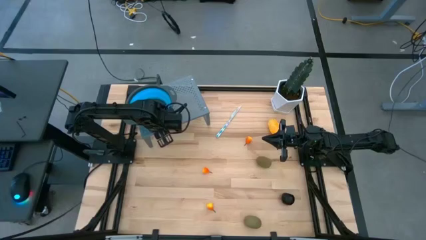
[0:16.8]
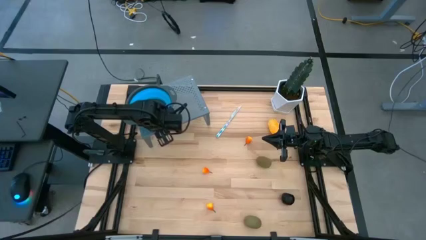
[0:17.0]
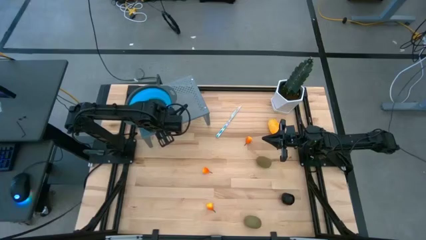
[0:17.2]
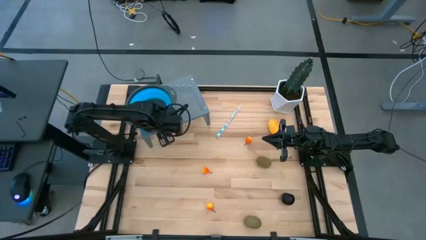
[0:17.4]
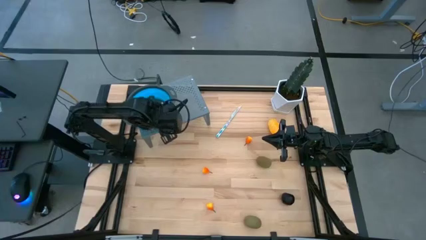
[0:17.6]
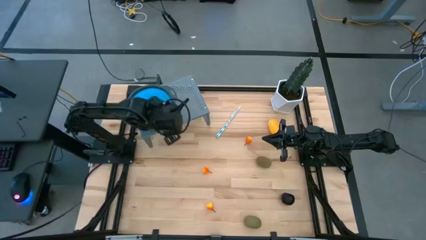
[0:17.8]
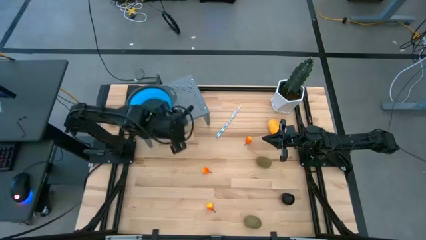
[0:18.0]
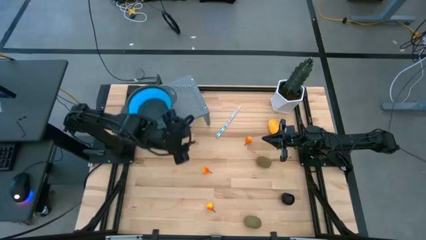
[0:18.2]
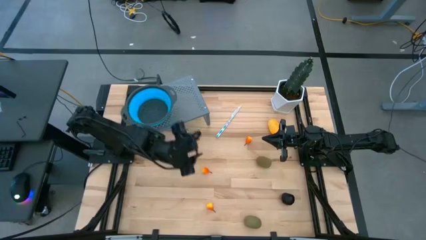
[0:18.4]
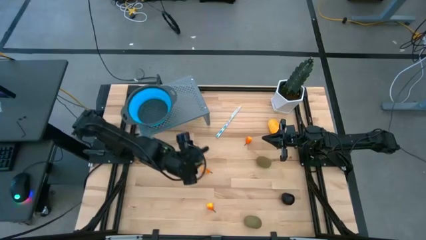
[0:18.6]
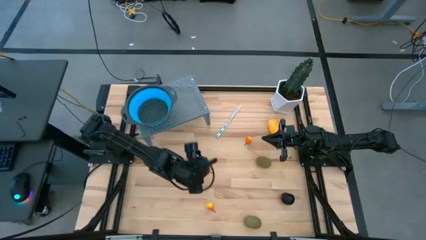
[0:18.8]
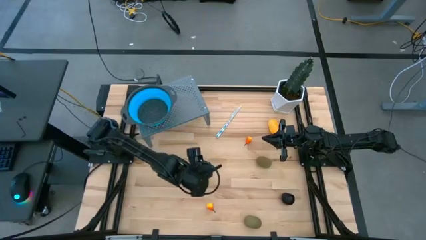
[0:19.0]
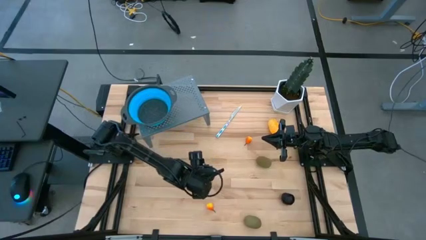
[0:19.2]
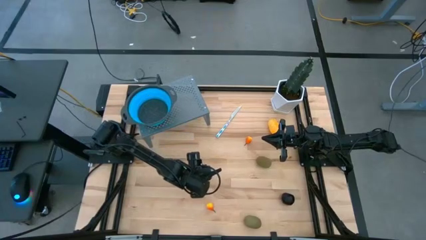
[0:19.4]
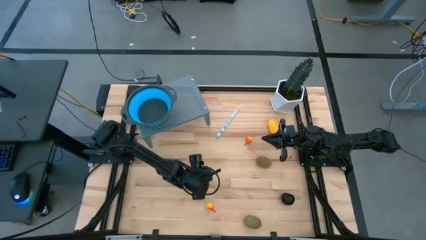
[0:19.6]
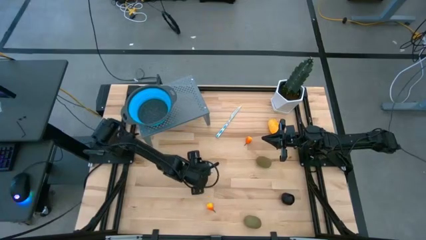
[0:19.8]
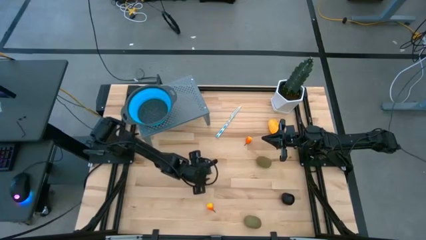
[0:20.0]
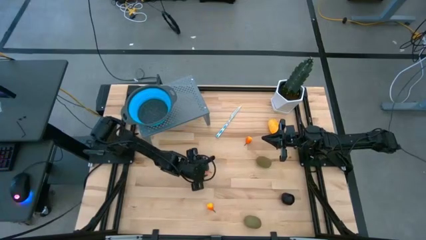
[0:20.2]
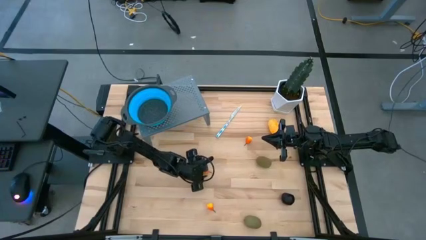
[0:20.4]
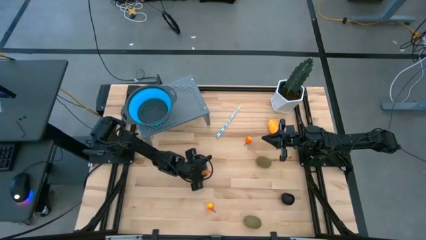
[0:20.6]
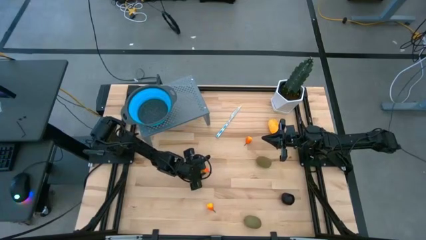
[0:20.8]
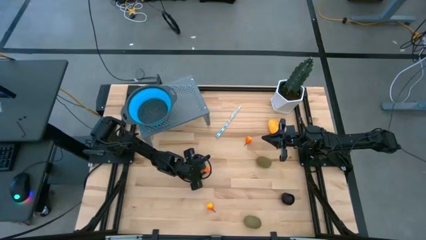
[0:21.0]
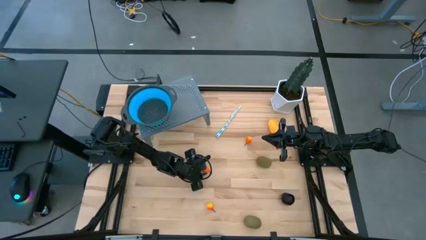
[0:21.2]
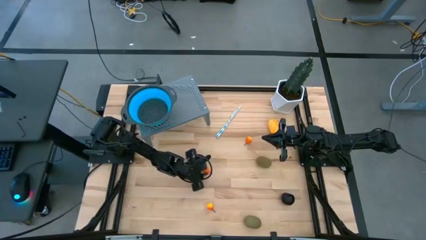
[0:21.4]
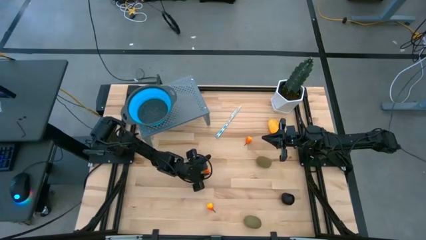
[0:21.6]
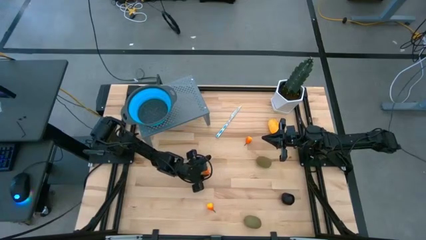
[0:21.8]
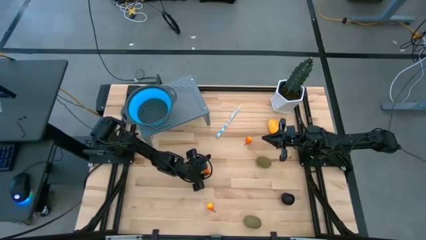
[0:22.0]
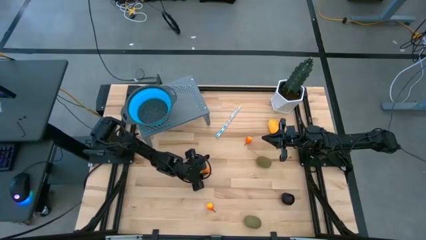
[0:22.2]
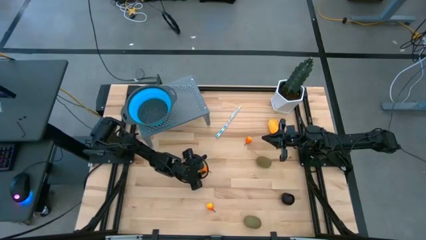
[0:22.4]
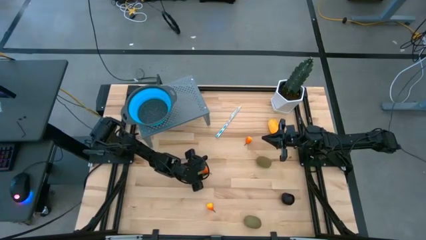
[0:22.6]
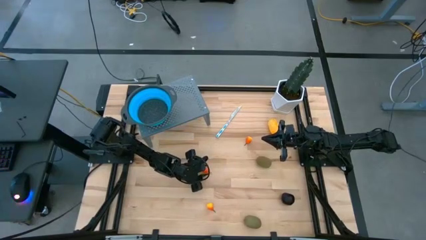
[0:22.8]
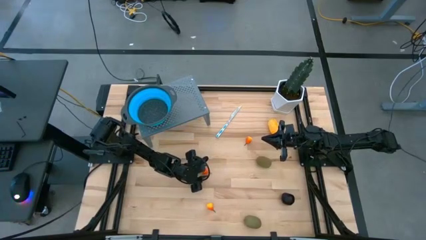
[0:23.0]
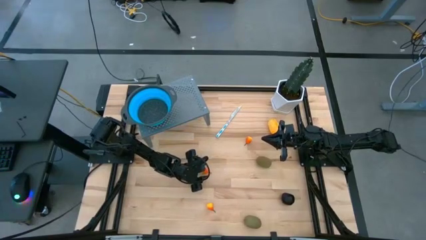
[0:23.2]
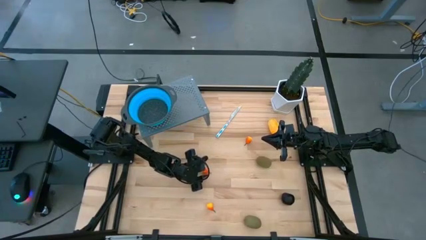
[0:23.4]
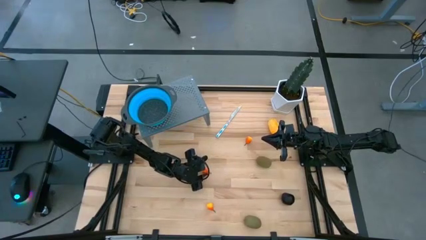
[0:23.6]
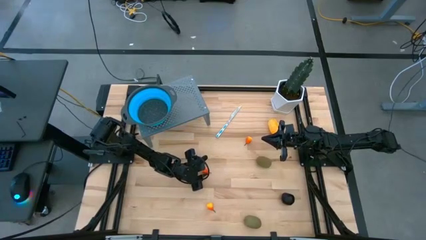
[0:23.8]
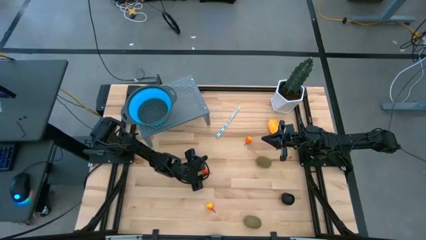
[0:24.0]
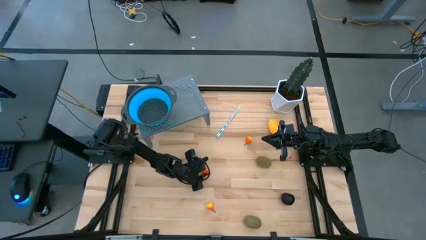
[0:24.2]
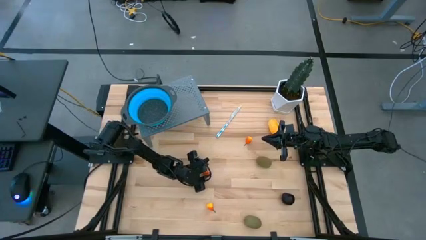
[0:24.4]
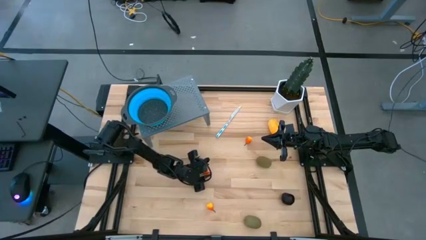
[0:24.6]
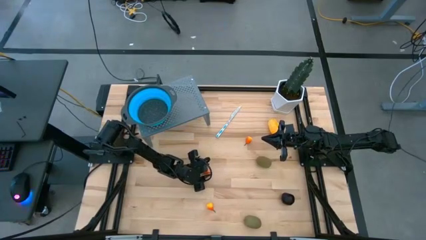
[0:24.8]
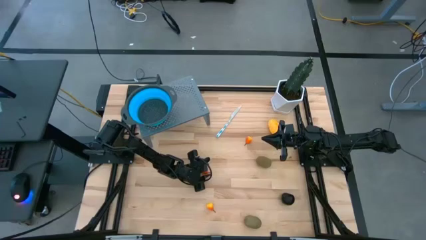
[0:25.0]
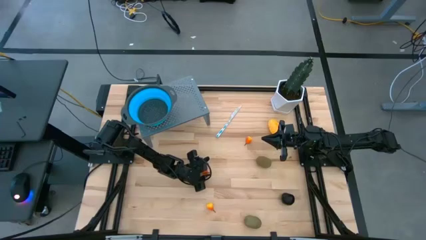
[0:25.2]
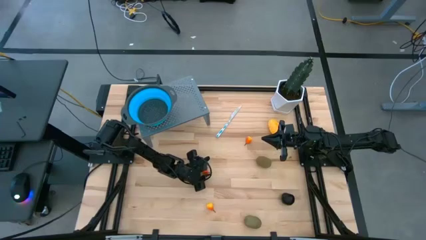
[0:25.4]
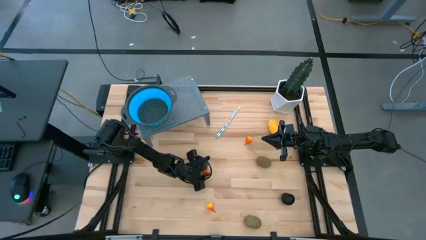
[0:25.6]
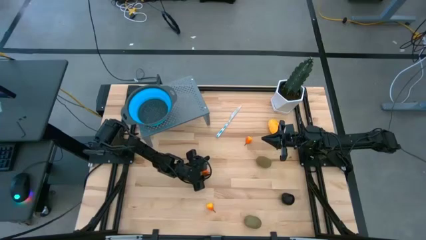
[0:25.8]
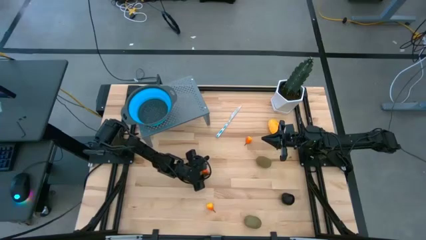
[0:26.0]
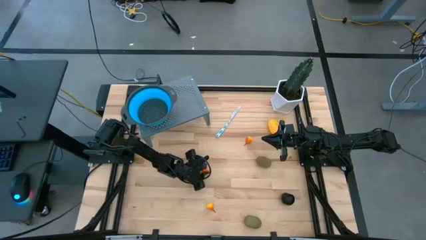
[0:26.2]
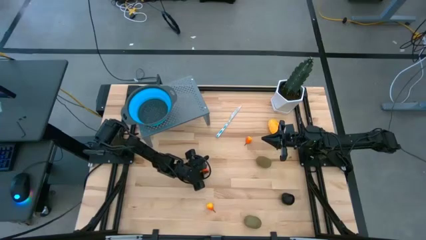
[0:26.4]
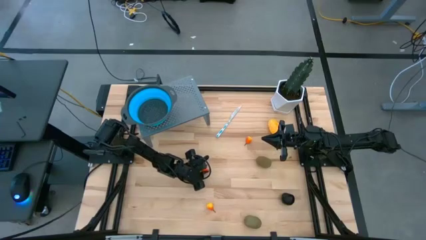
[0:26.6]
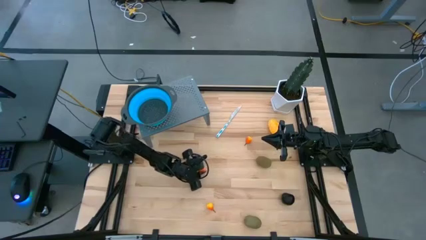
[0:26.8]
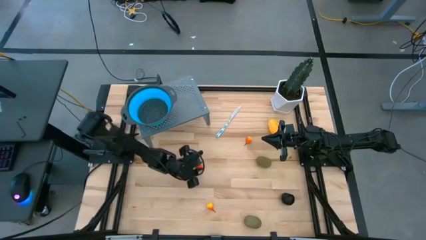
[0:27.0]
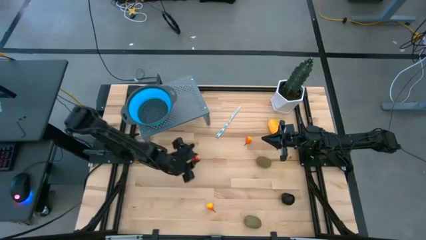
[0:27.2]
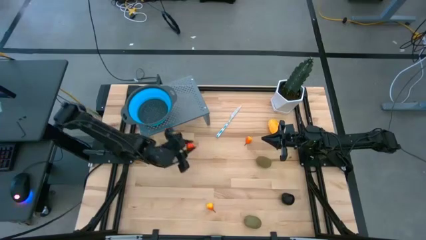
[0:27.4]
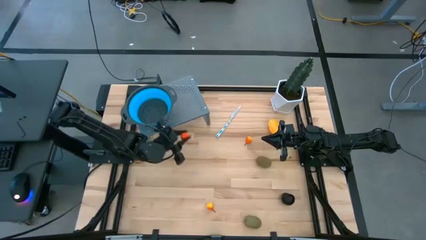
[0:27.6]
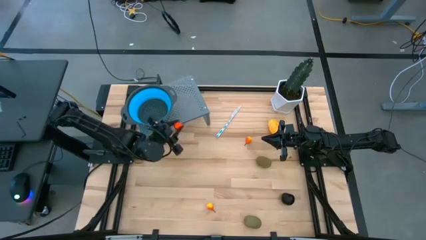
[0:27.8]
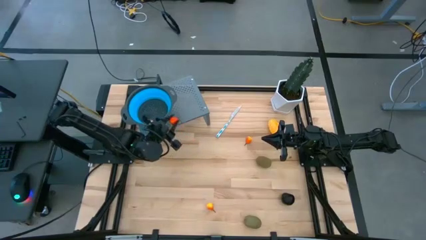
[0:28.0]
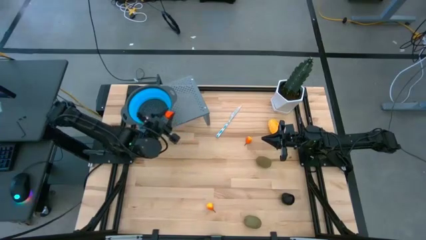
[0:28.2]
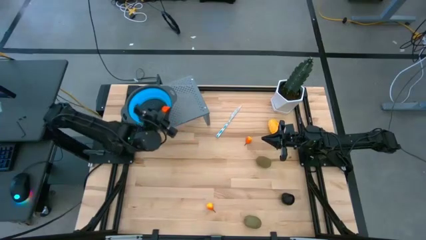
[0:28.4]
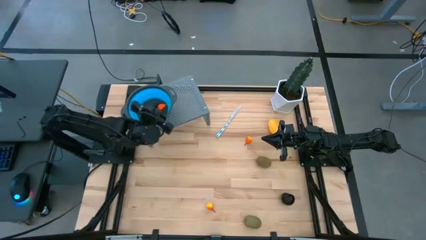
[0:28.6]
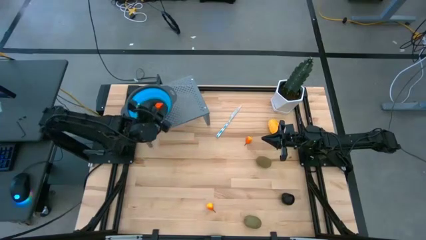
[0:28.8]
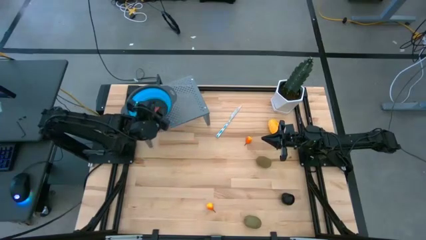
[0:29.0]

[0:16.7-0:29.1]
Task: Pick & Place Fruit
Put the middle orange pear into the blue strainer bowl

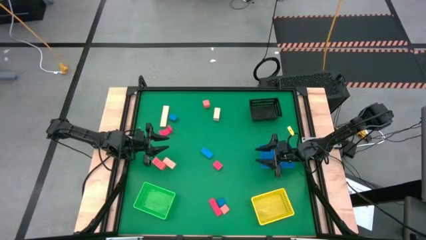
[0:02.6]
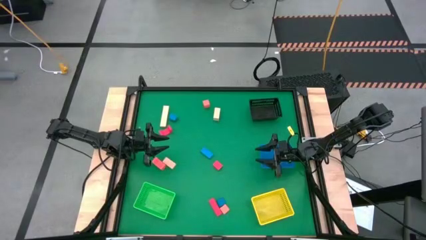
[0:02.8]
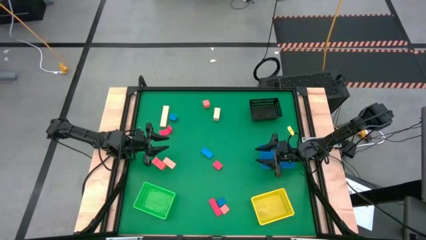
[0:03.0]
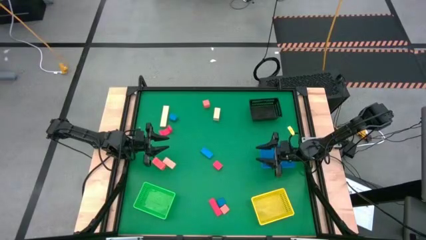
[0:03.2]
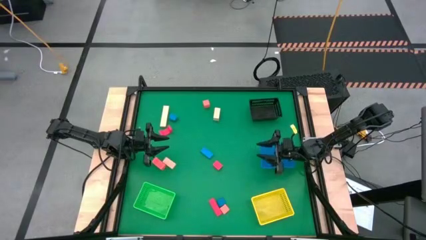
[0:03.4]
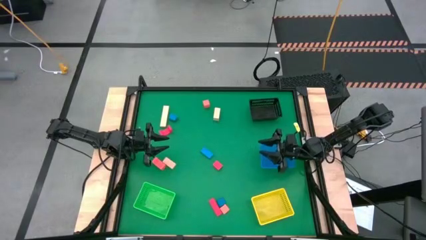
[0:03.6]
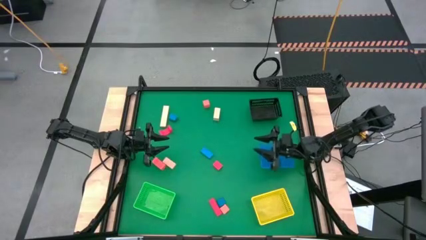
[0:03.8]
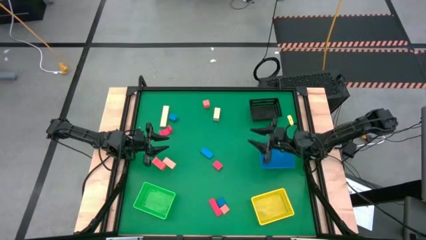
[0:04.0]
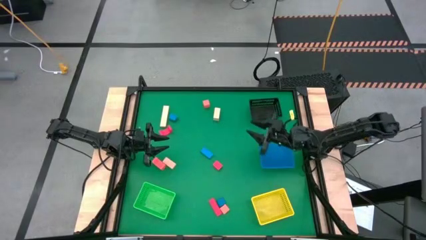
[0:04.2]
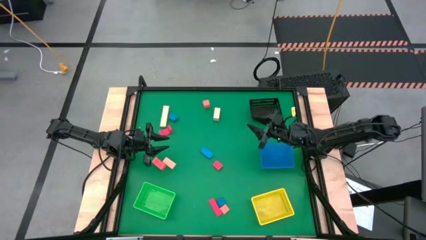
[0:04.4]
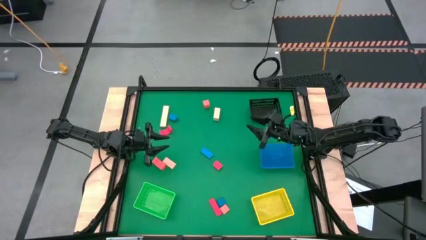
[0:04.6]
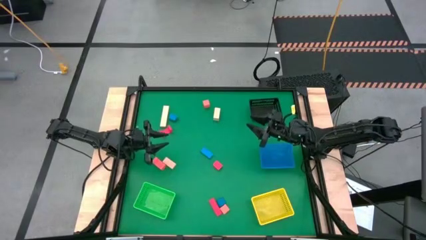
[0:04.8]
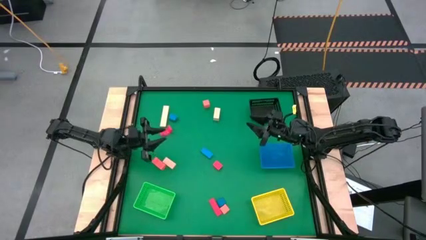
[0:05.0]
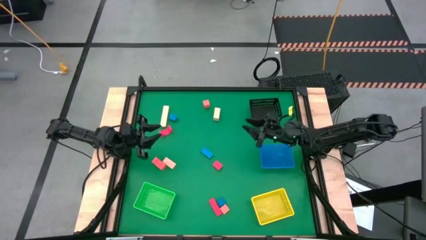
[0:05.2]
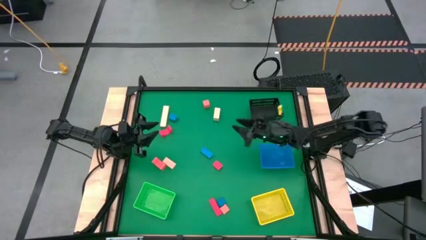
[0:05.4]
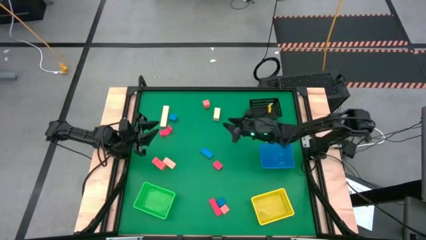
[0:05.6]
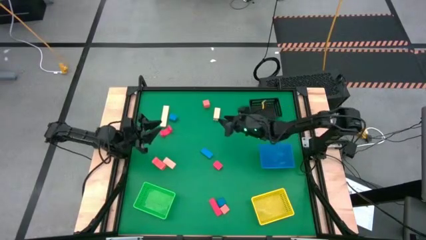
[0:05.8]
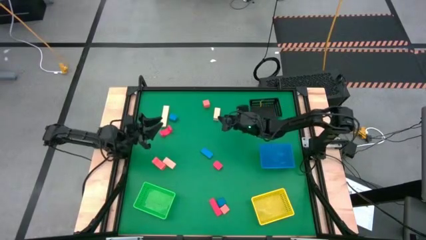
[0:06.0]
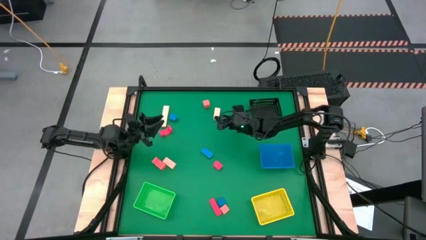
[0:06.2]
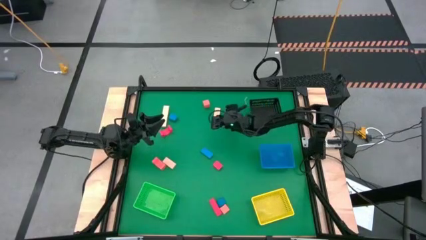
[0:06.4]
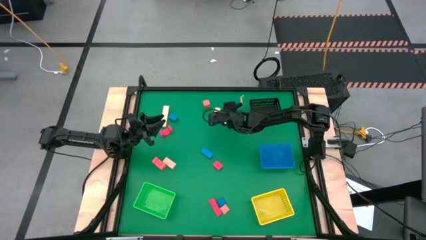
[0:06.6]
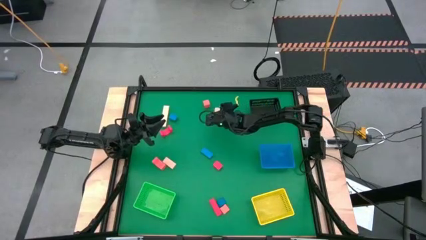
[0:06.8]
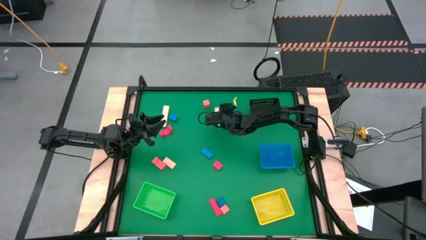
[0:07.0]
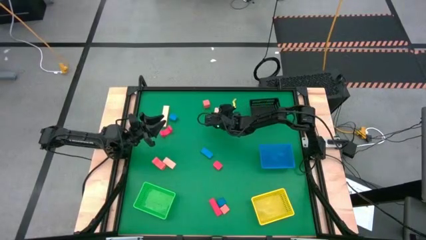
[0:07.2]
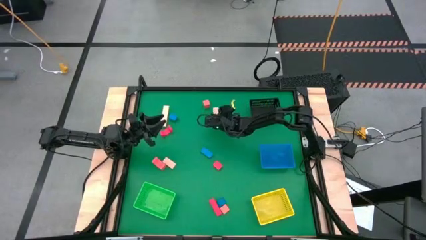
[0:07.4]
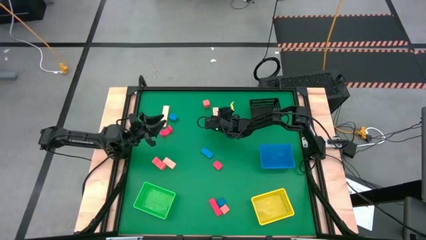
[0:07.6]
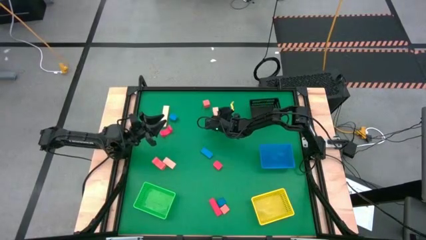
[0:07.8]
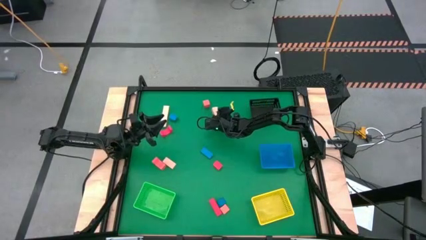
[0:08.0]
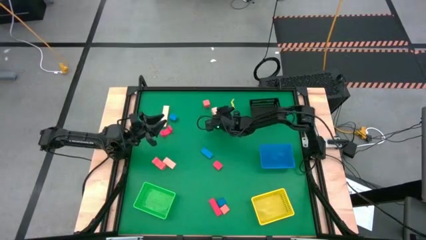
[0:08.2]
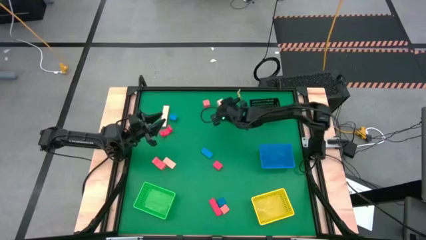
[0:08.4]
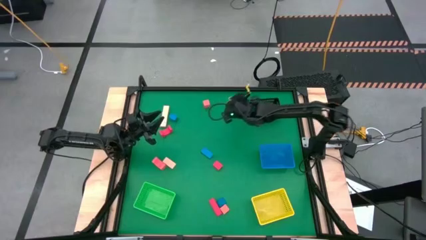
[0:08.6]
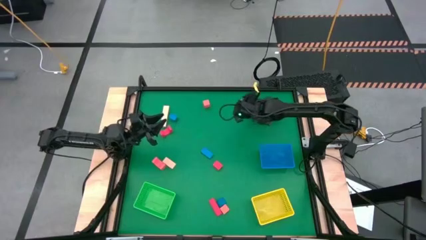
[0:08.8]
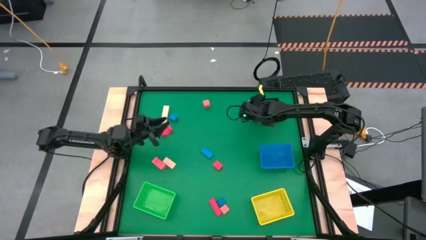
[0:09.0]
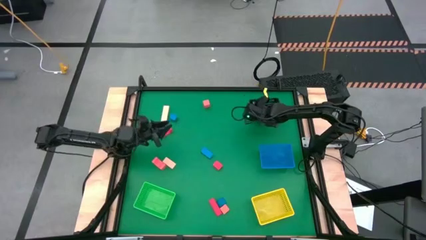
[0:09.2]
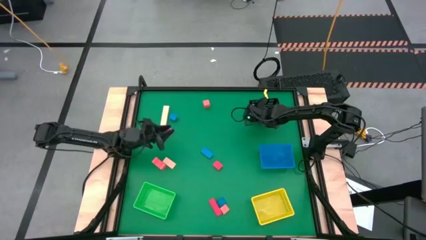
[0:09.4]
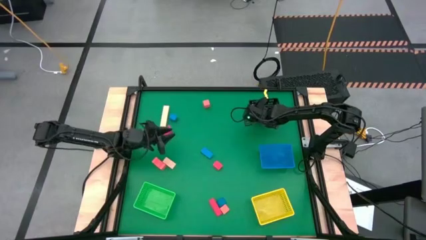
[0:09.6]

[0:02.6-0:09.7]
Task: Sort & place blocks by color
Put the brown block into the black bin
